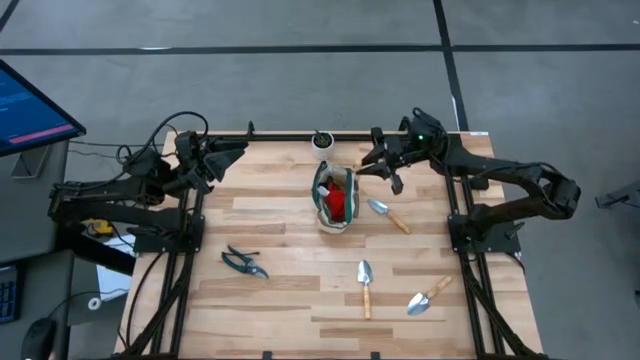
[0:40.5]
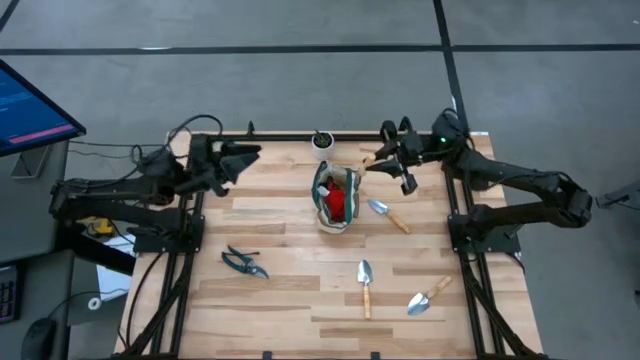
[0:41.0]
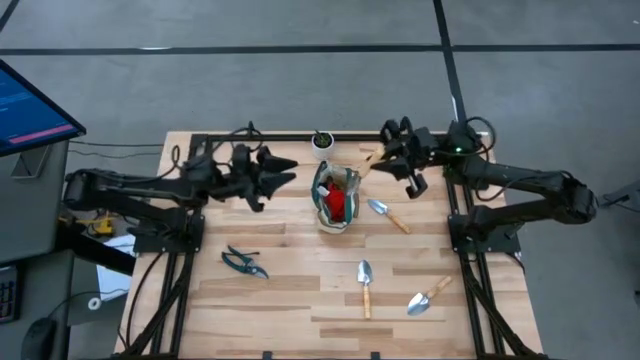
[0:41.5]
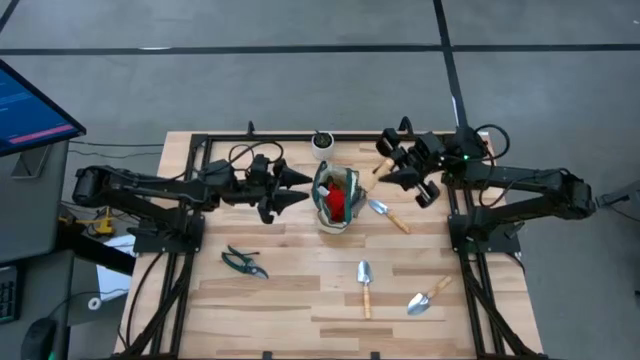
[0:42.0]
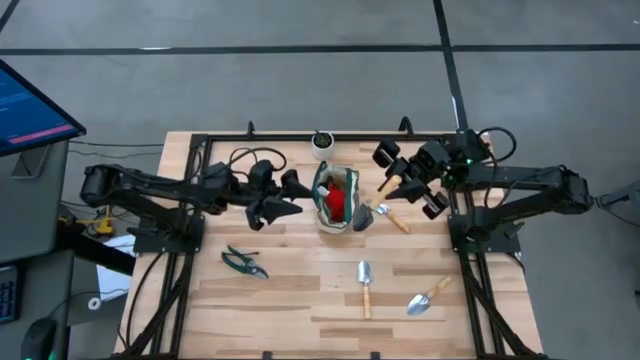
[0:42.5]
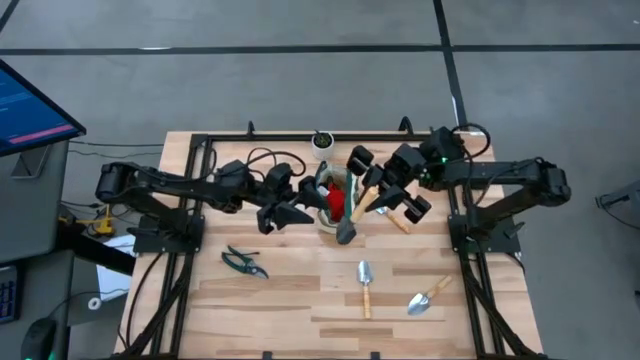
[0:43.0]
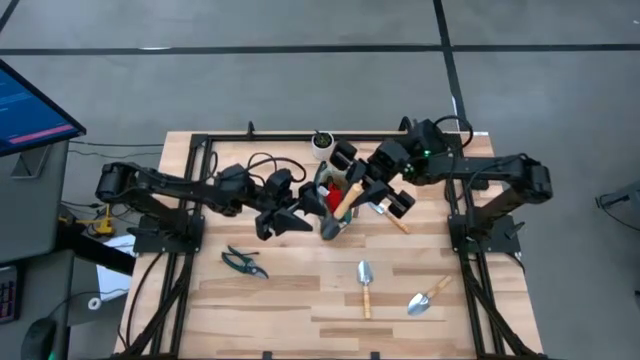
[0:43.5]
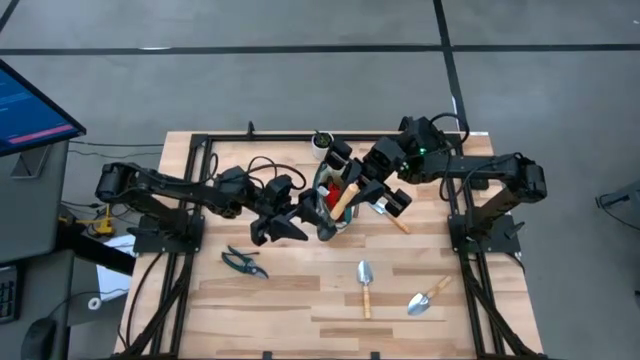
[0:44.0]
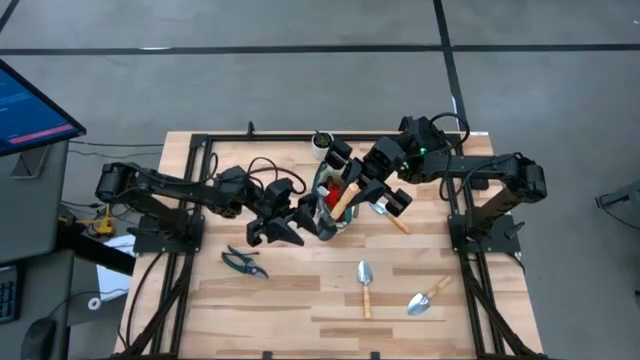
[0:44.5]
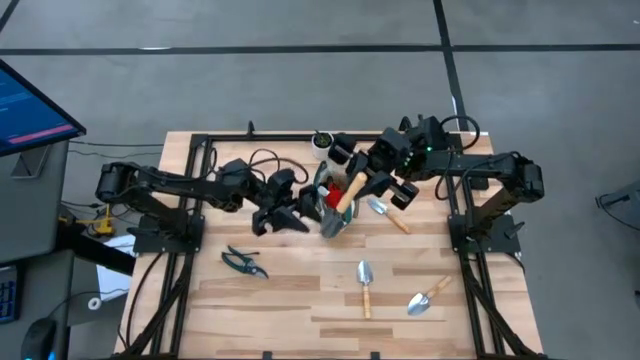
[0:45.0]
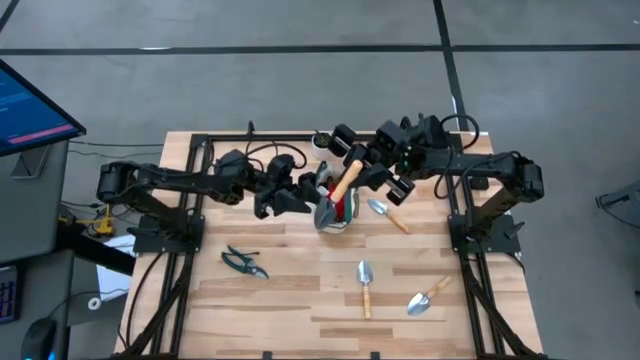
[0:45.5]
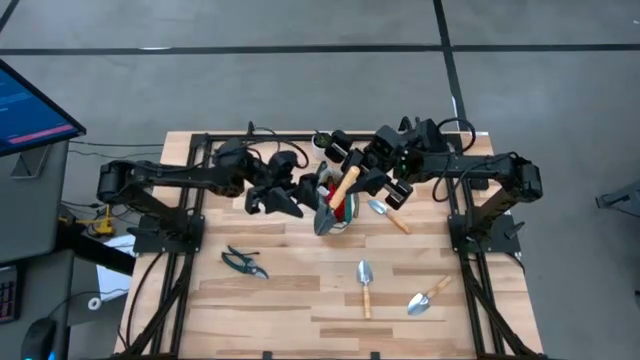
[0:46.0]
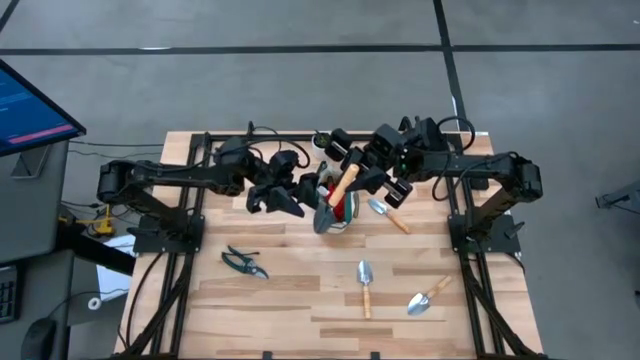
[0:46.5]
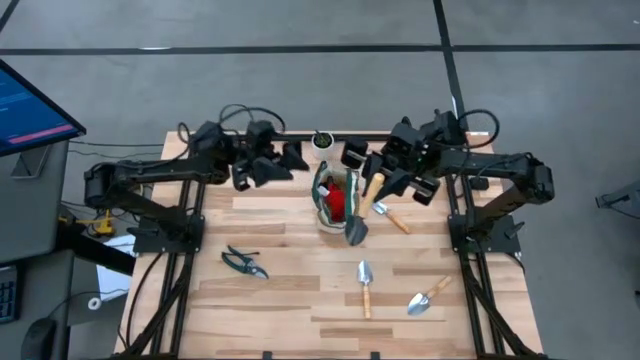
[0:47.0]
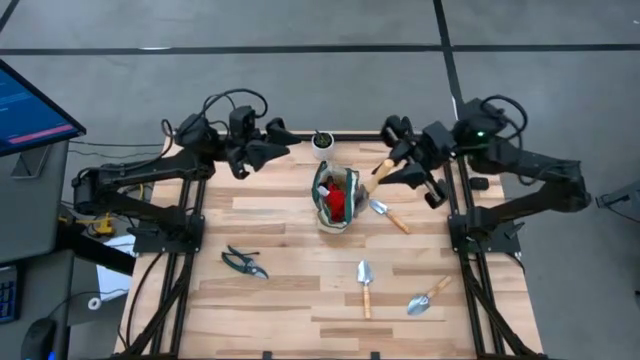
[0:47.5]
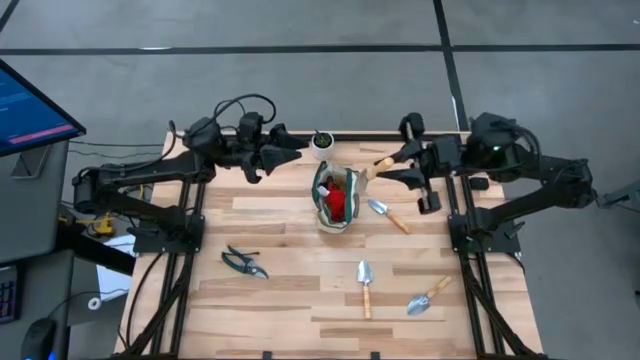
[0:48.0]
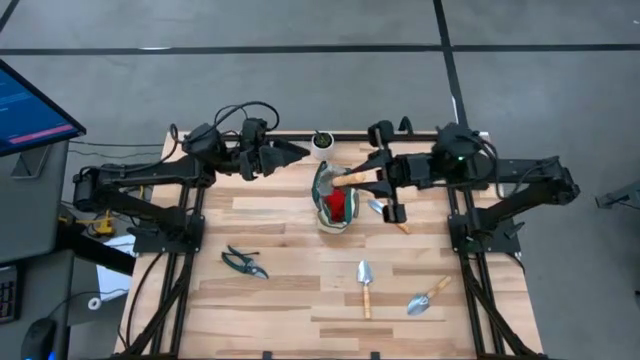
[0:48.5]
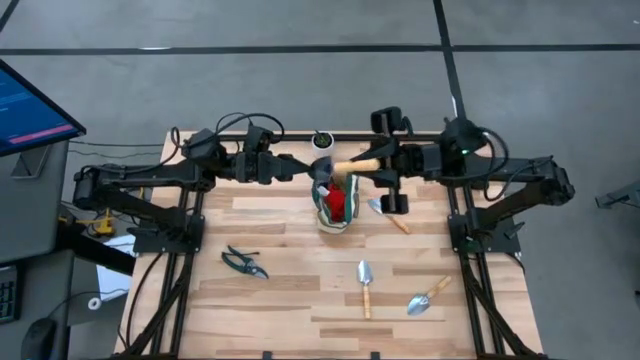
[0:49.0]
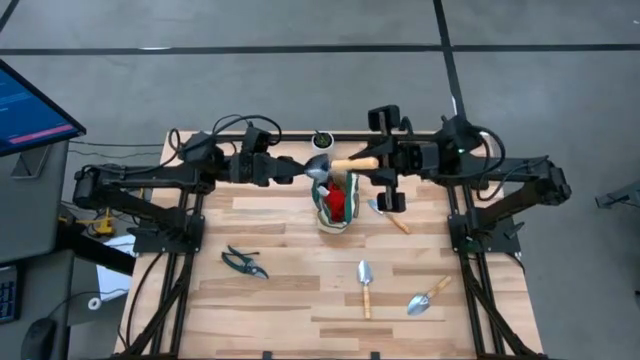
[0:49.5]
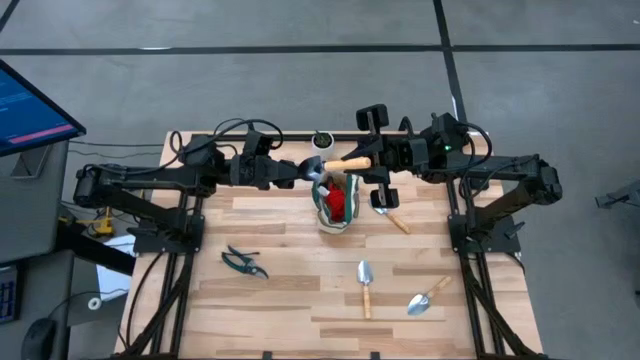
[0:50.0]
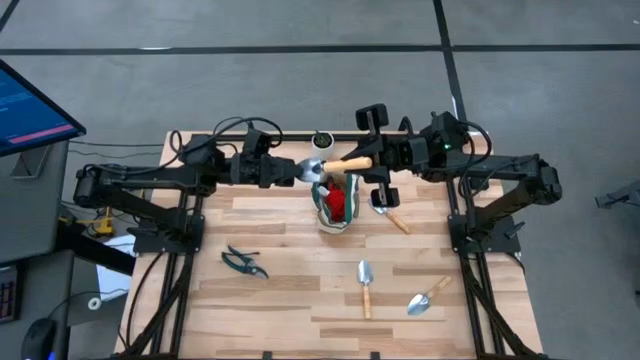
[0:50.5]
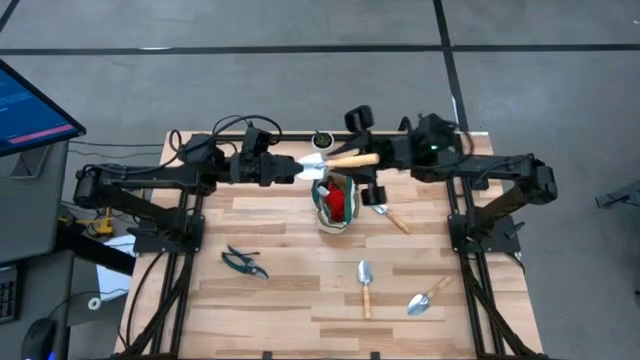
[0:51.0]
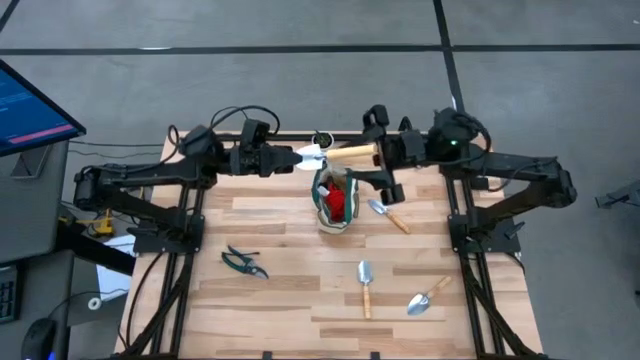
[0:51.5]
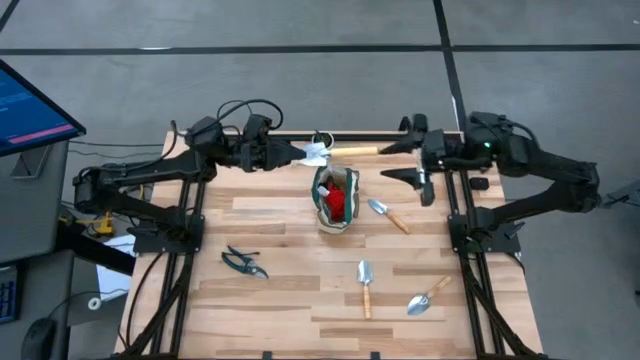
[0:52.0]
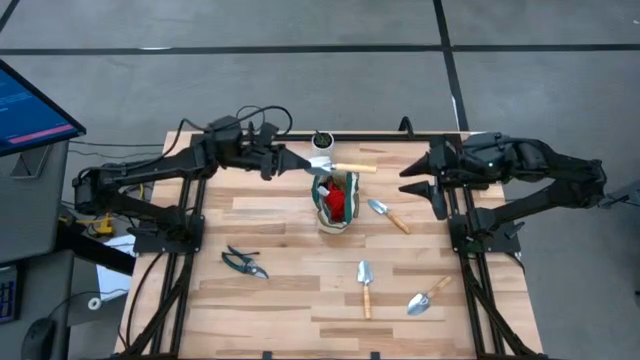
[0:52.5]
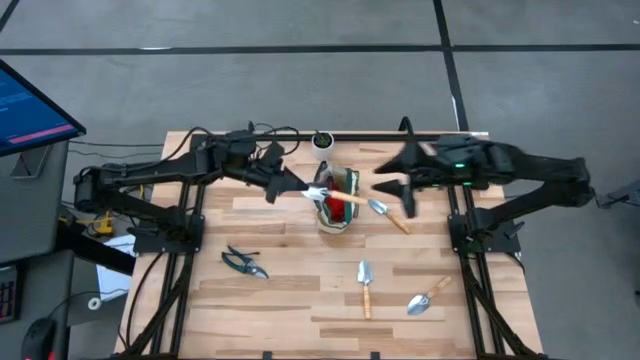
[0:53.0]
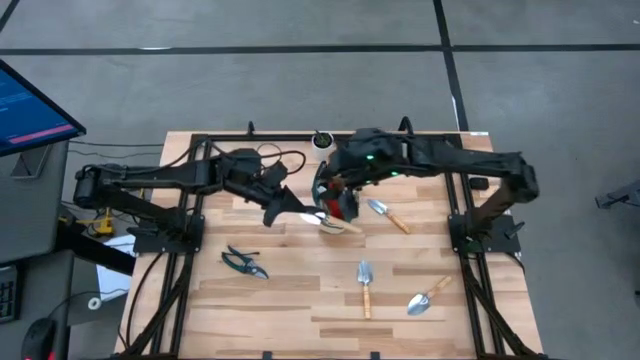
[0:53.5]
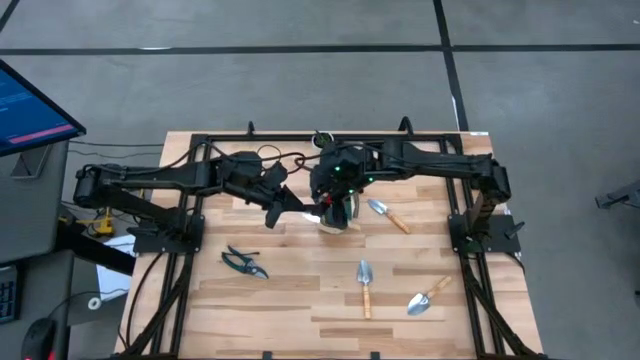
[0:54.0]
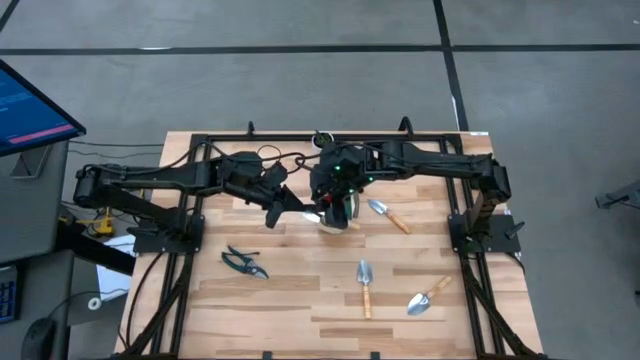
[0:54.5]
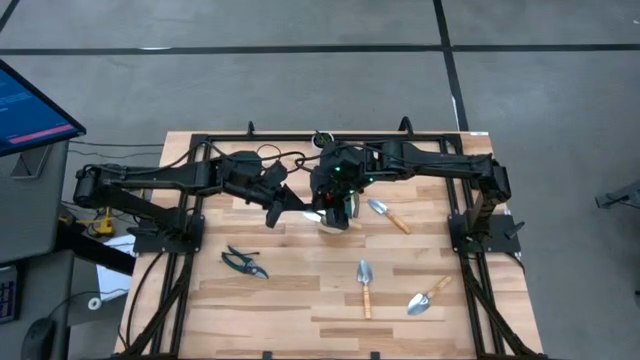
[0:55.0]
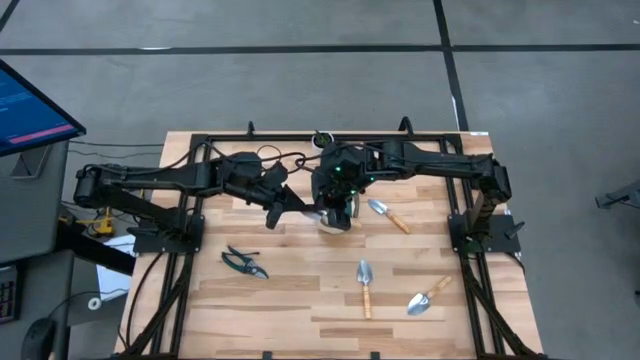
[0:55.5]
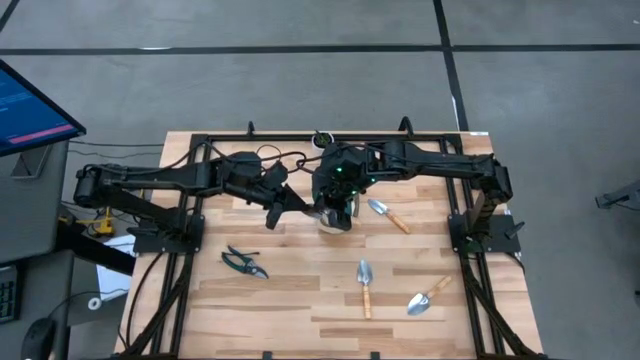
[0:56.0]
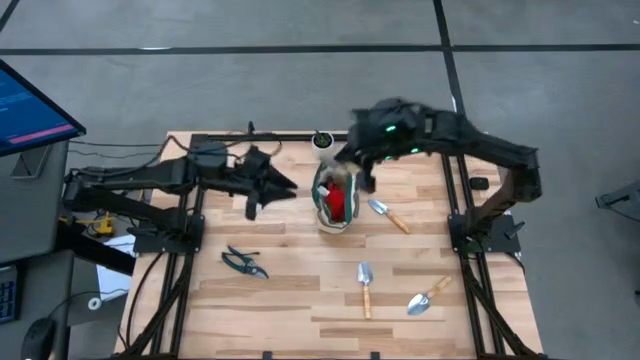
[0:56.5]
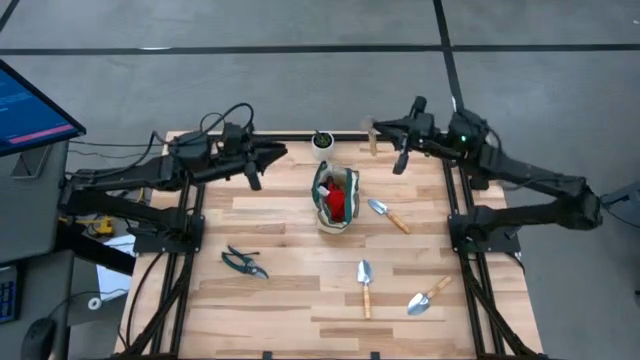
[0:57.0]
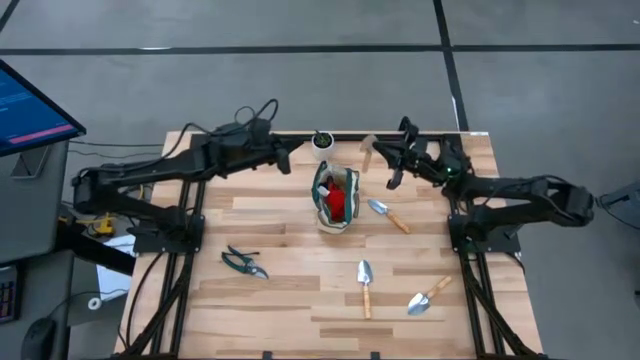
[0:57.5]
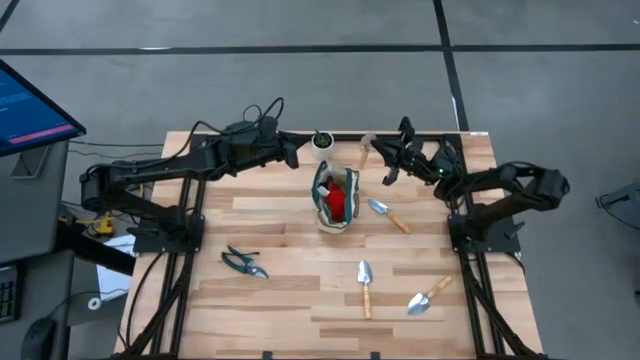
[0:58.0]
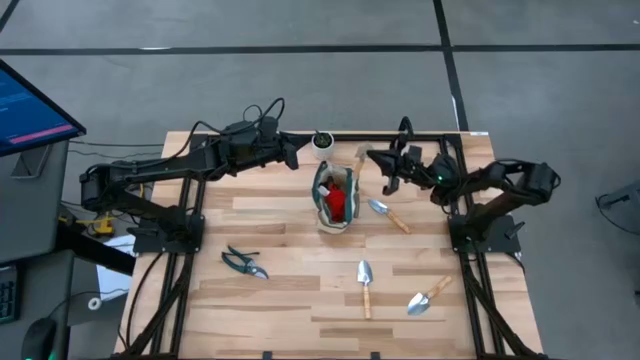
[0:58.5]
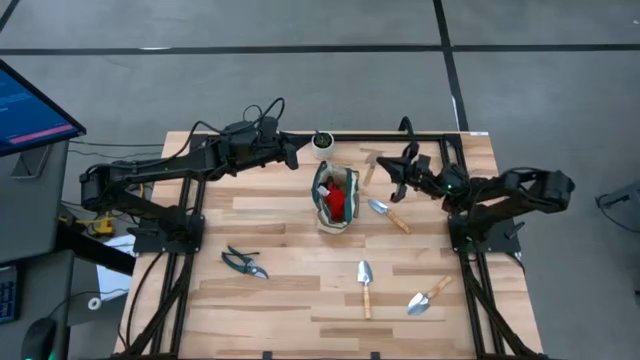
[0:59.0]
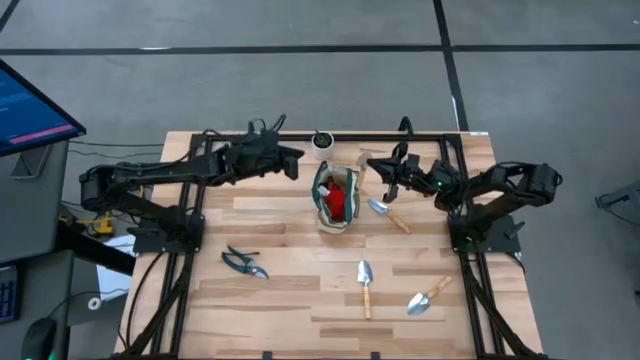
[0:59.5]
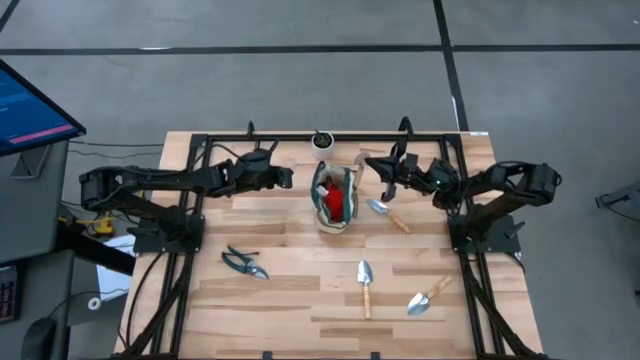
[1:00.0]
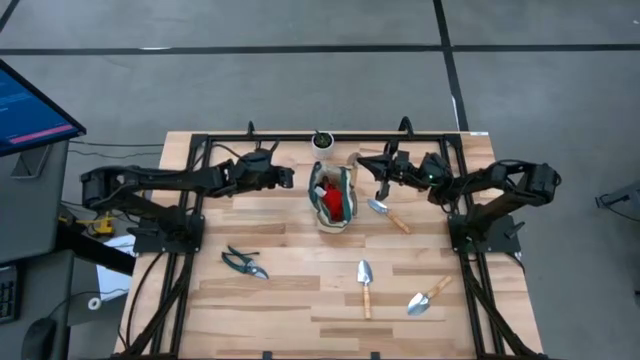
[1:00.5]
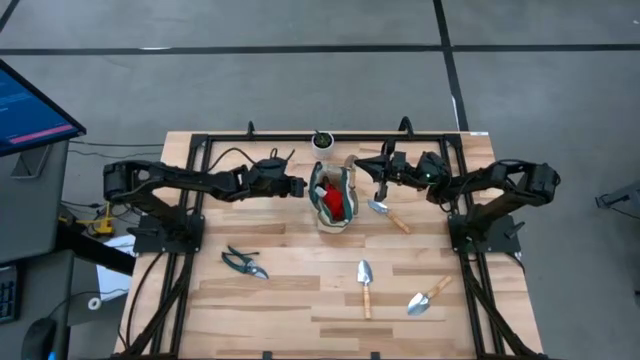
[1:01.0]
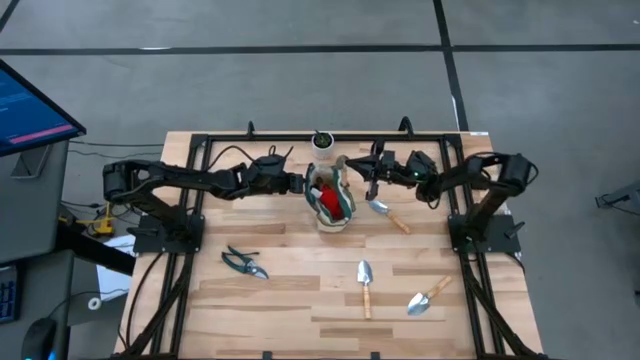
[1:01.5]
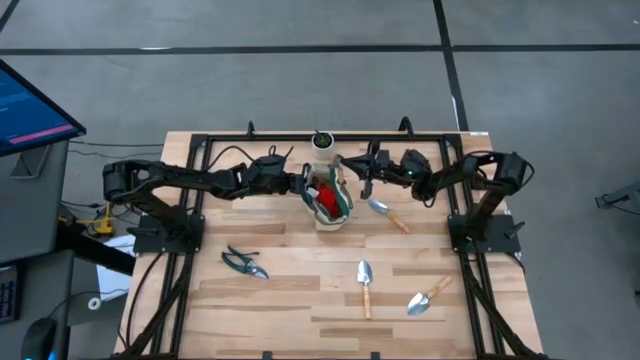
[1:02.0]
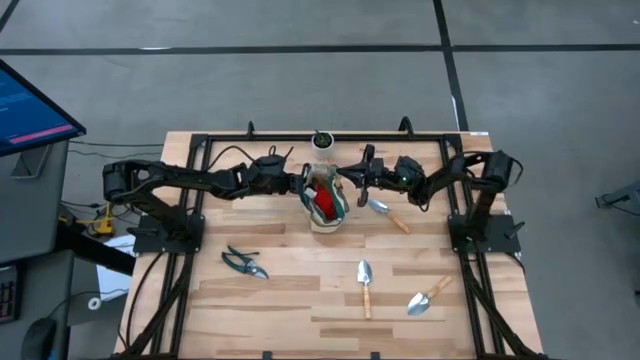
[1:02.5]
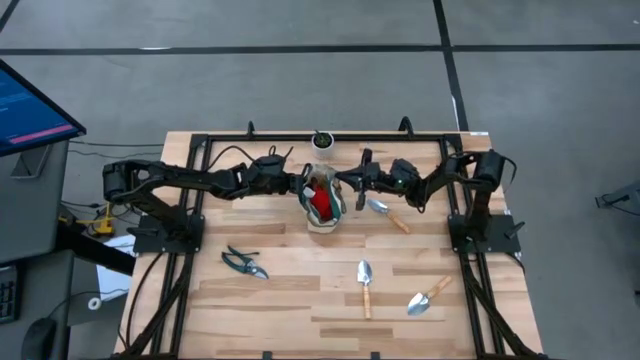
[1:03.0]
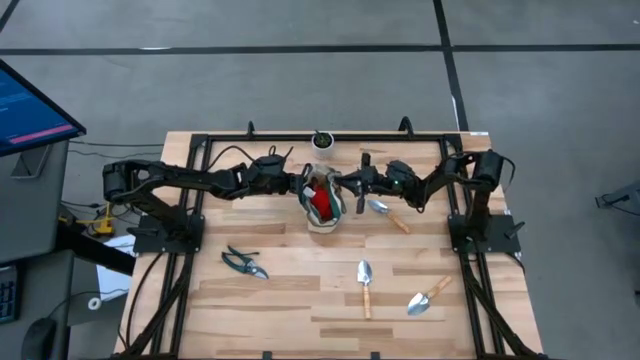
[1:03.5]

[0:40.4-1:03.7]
Task: Pick & Place Garden tools in Gardening bag
Put the brown trowel into the green gardening bag
